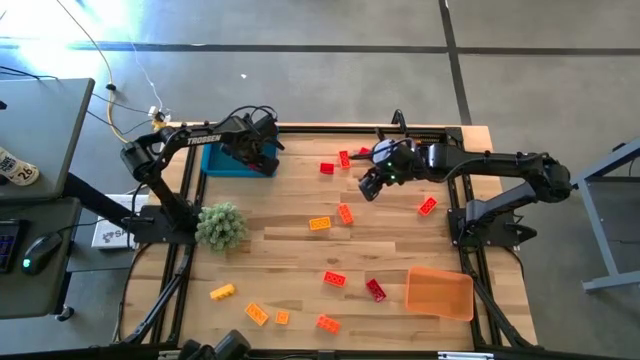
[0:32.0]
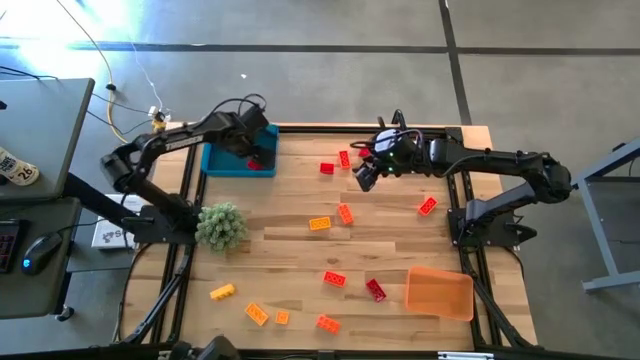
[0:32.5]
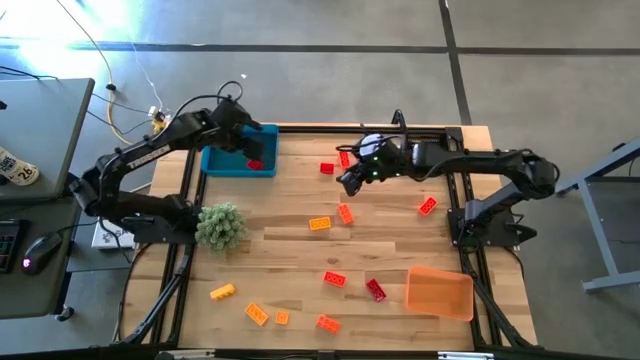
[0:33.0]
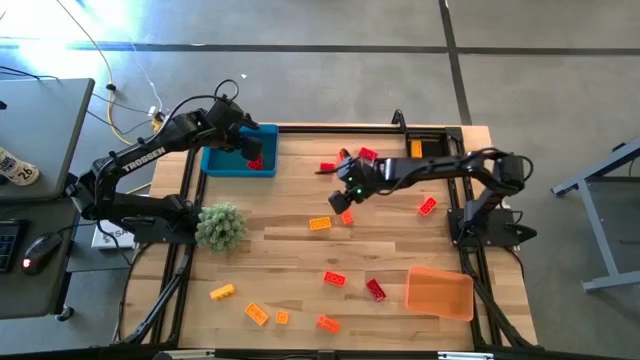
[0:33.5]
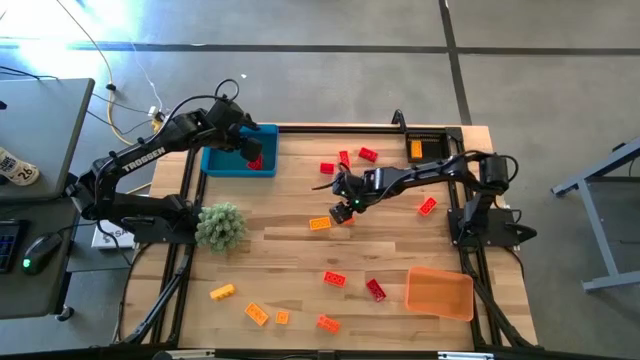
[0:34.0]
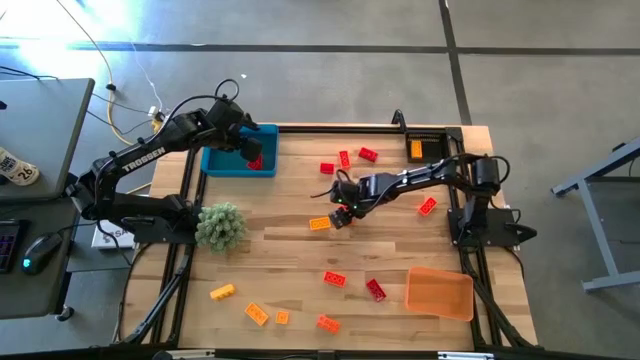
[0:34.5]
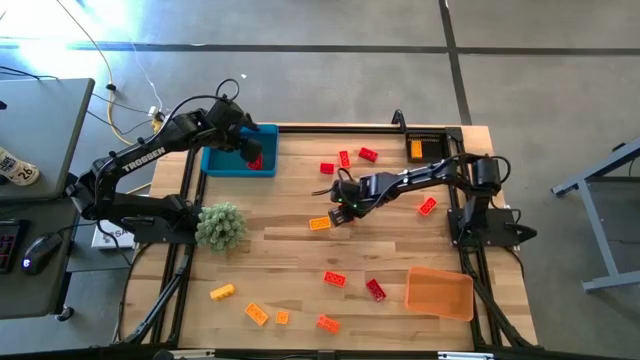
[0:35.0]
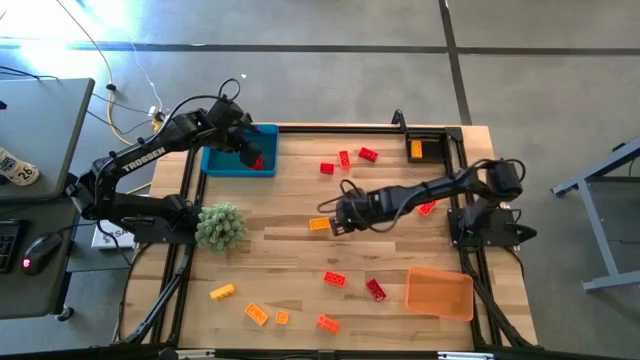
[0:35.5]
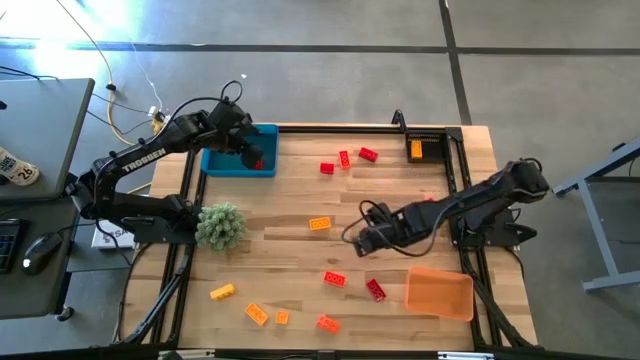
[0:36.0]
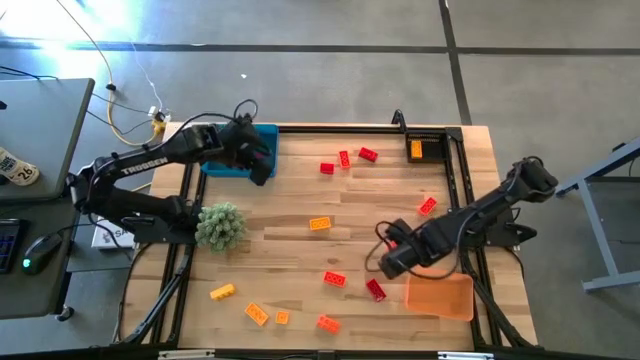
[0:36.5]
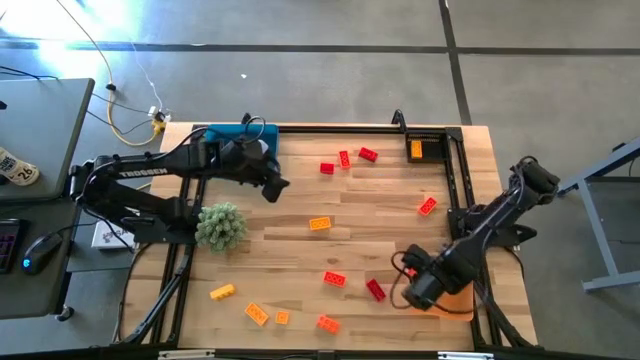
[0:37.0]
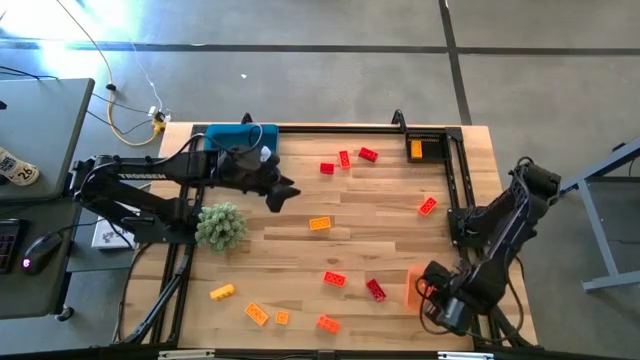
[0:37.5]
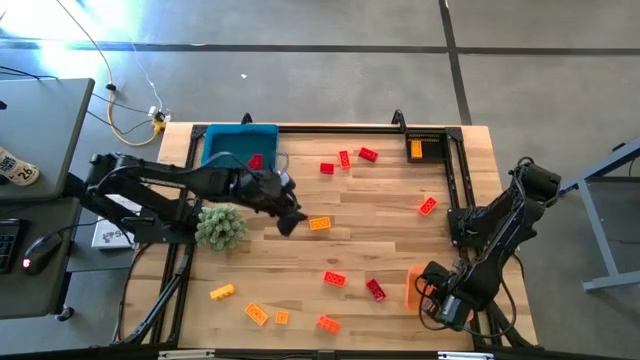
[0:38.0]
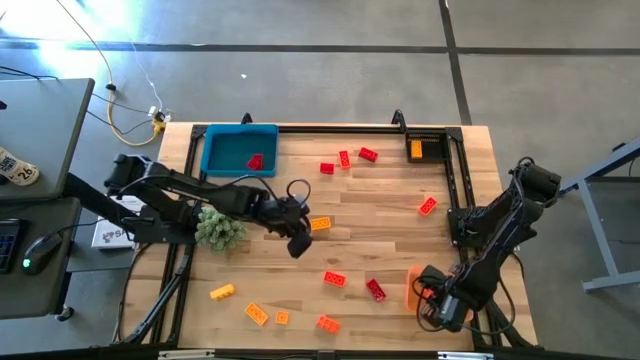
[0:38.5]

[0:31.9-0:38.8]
Task: Sort & place blocks by color
Put the orange game piece into the orange bin

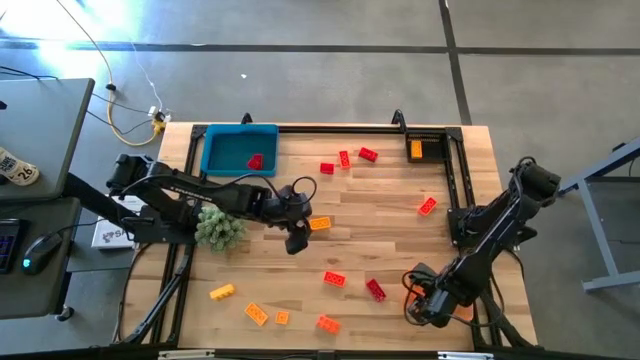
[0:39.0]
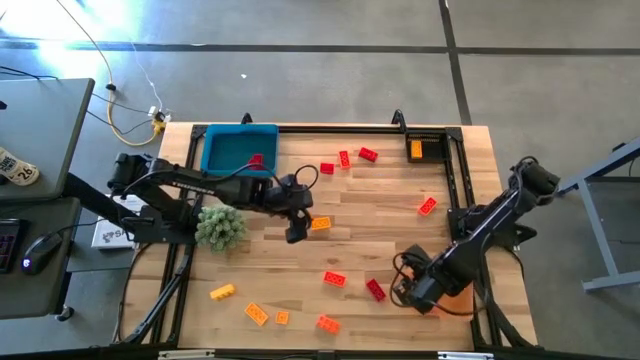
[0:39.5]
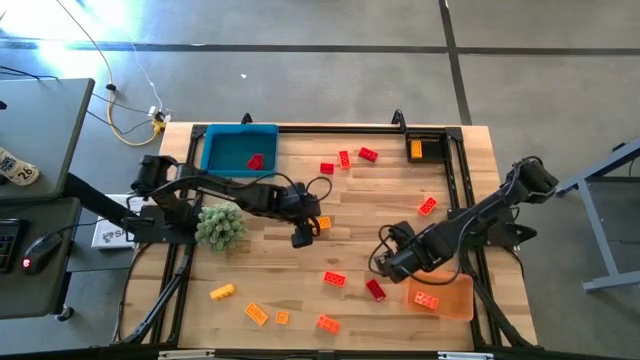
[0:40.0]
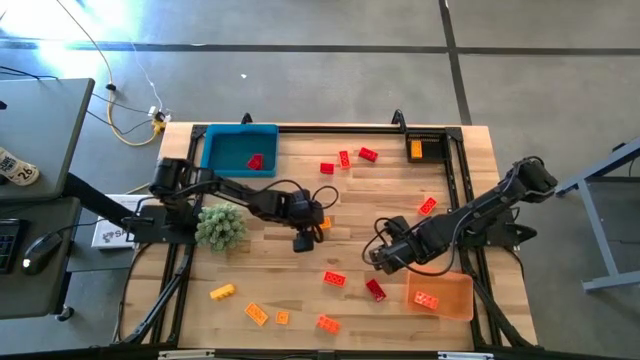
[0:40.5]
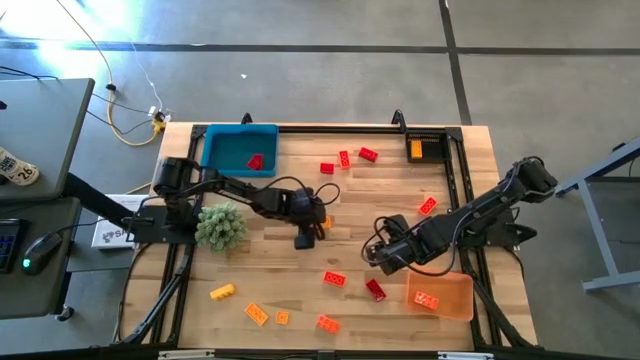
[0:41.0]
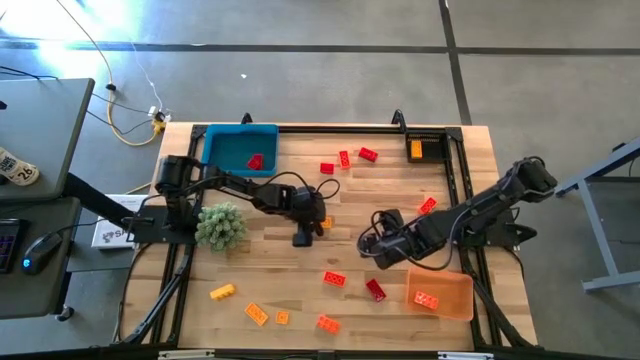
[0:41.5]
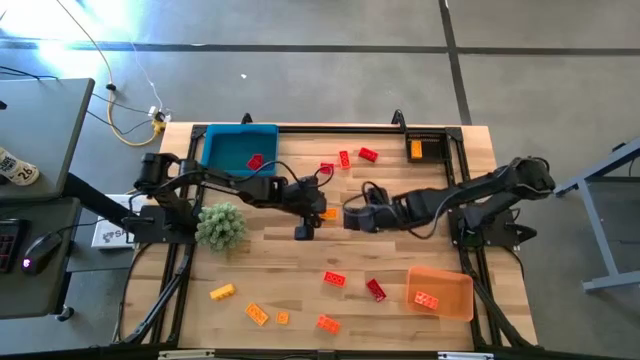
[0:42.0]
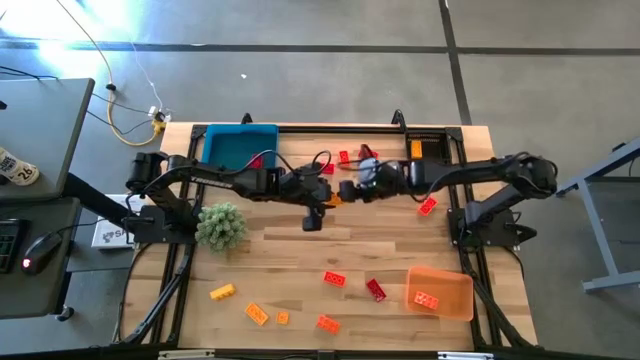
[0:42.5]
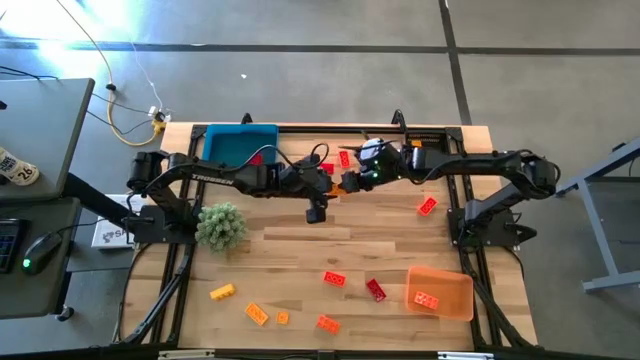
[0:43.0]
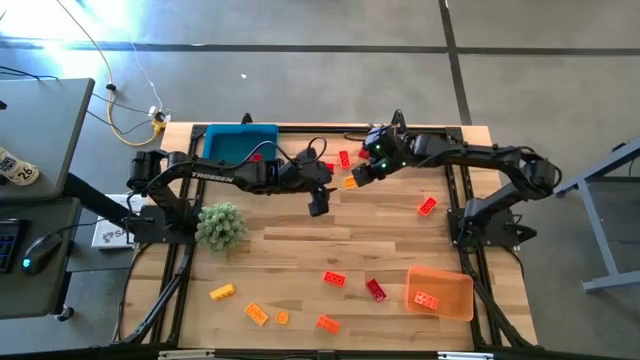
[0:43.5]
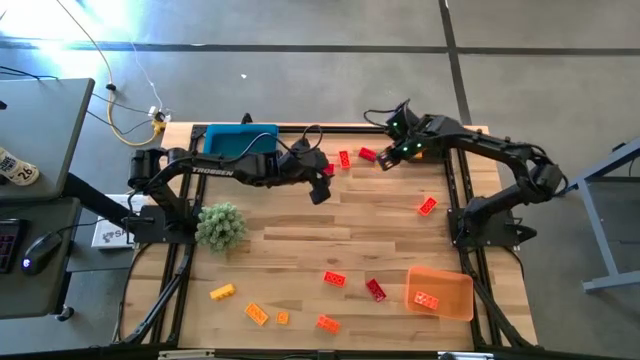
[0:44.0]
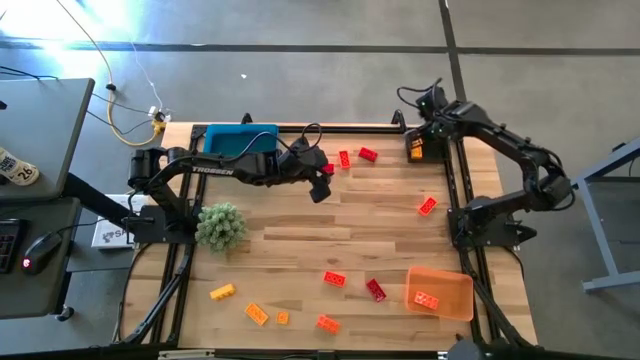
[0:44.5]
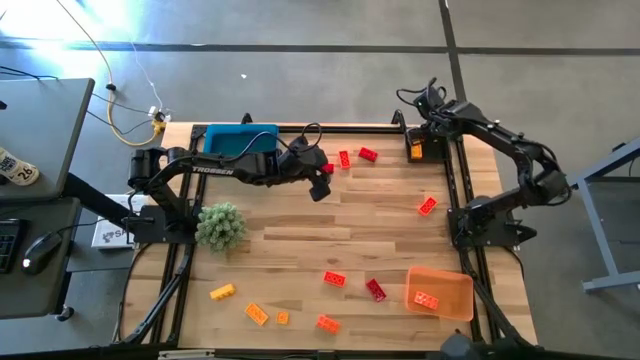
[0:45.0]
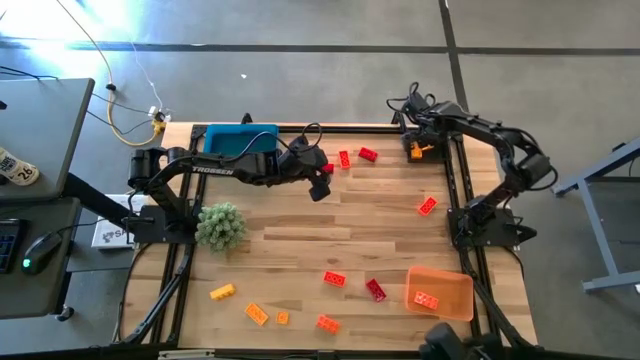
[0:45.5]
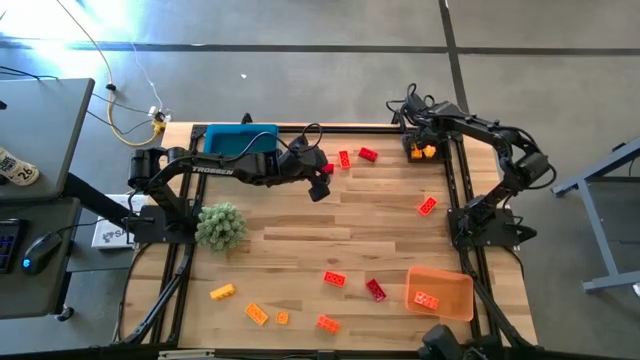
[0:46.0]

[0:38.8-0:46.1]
Put the yellow game piece into the black bin

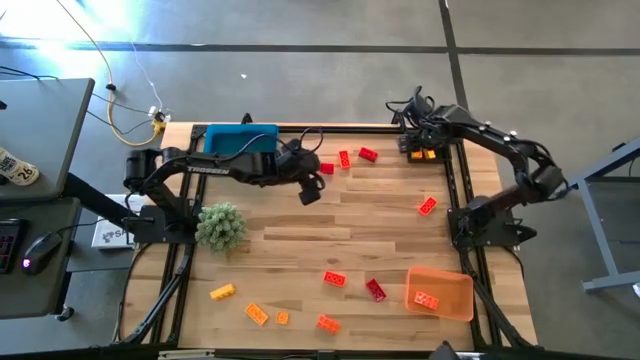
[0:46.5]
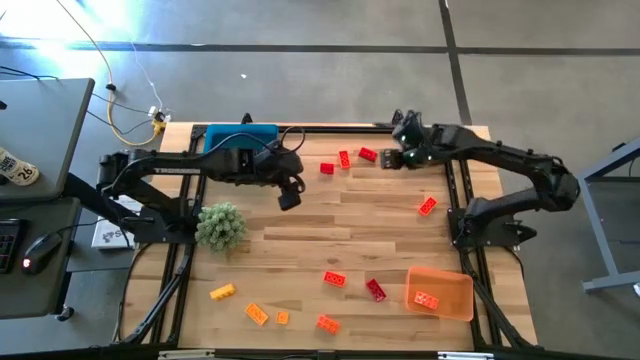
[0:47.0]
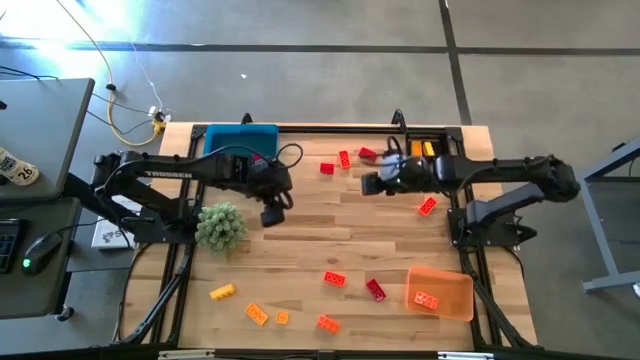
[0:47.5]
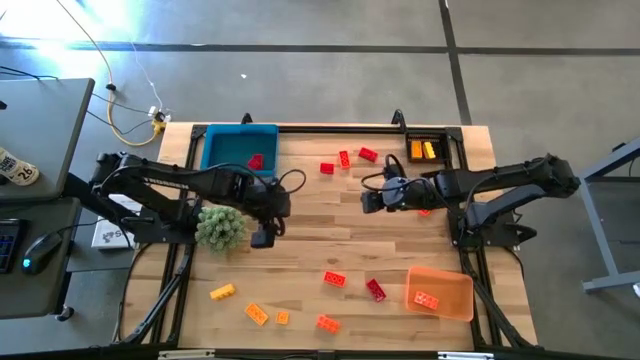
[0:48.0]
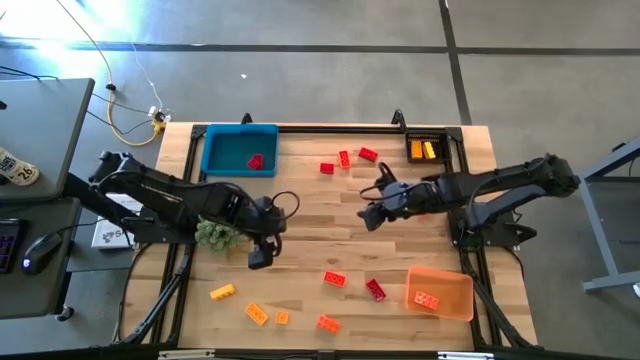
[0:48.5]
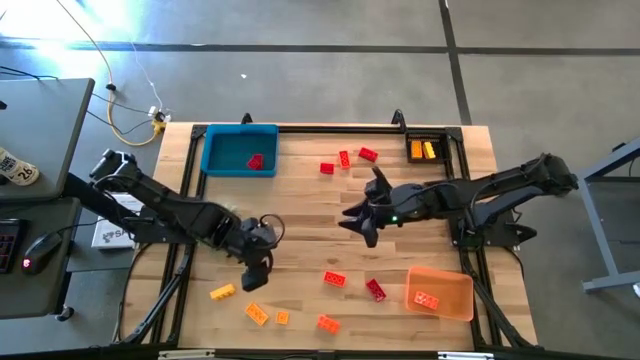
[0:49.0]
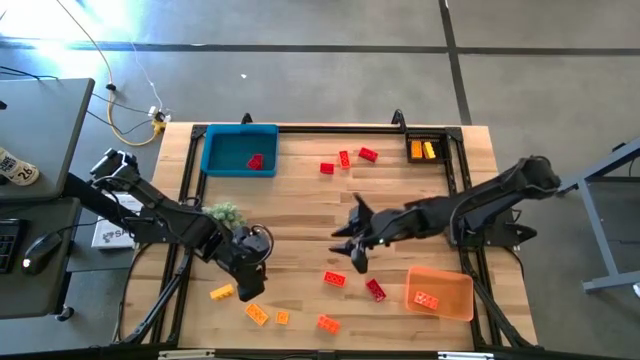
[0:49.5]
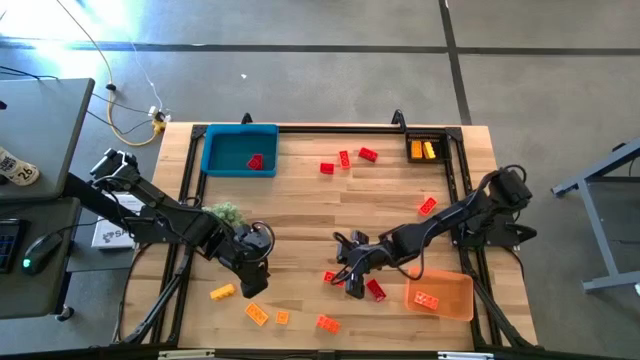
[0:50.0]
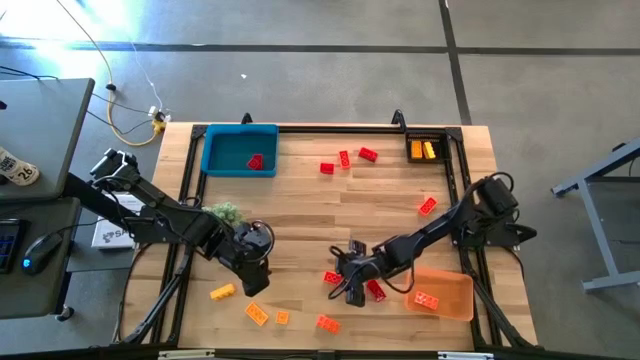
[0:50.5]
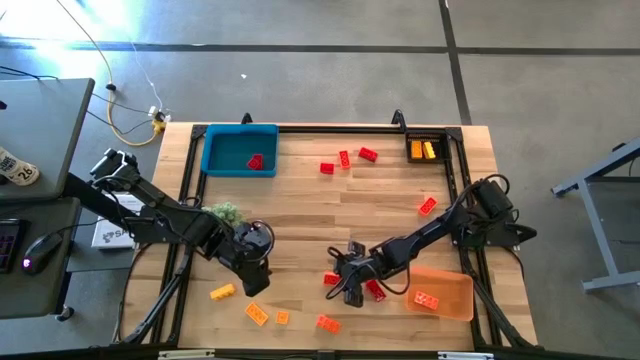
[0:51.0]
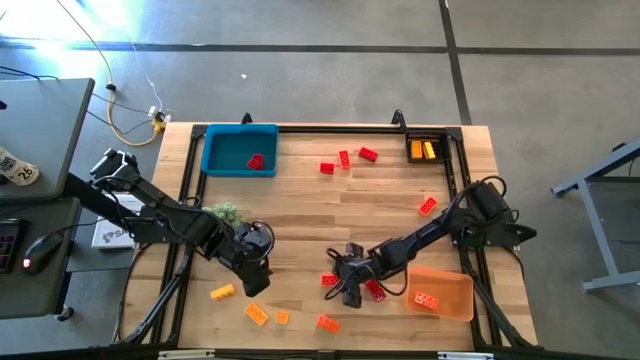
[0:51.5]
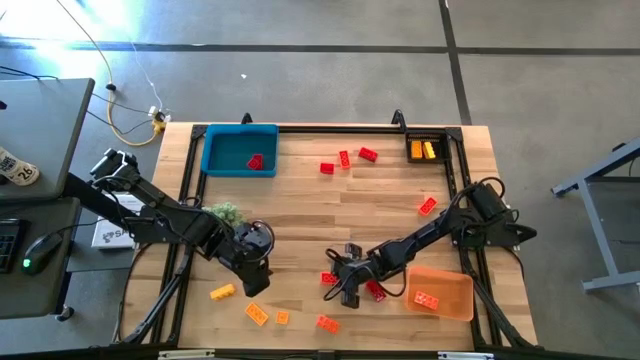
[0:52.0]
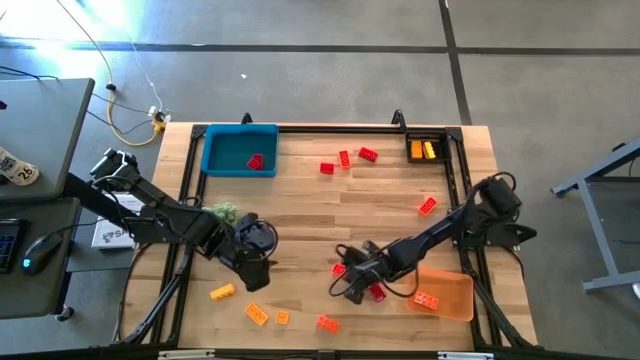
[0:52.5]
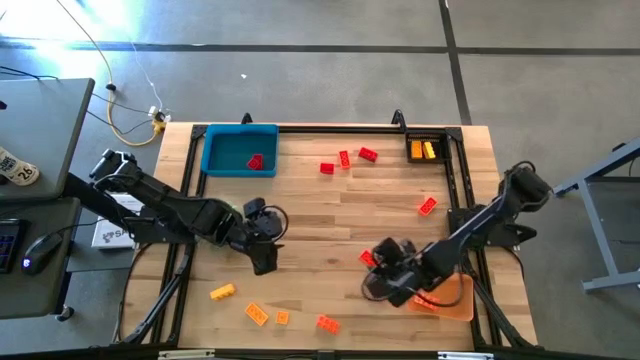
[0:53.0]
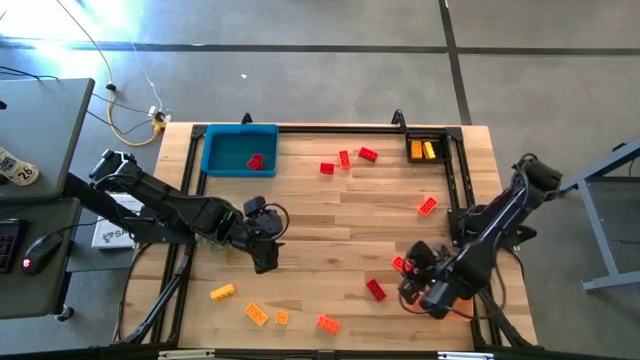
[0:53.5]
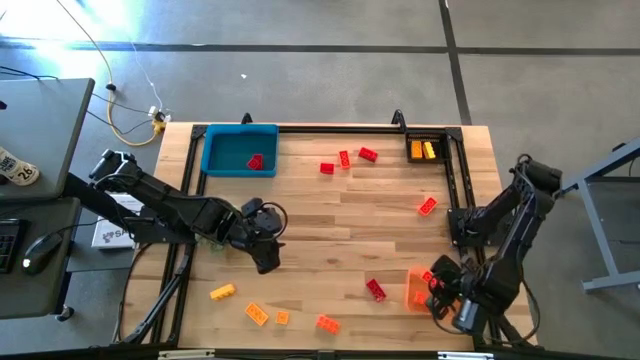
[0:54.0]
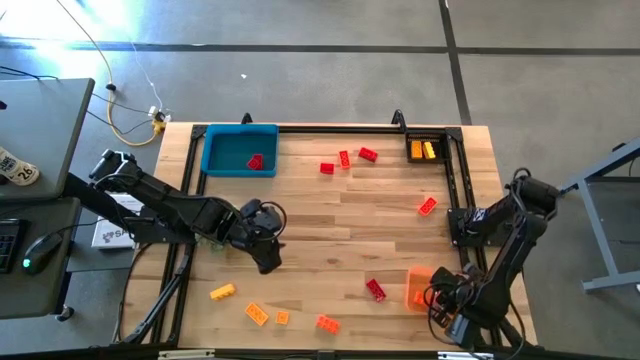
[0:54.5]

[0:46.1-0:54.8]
Put the orange game piece into the orange bin

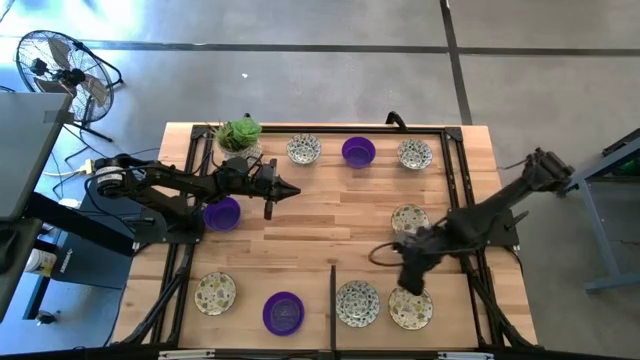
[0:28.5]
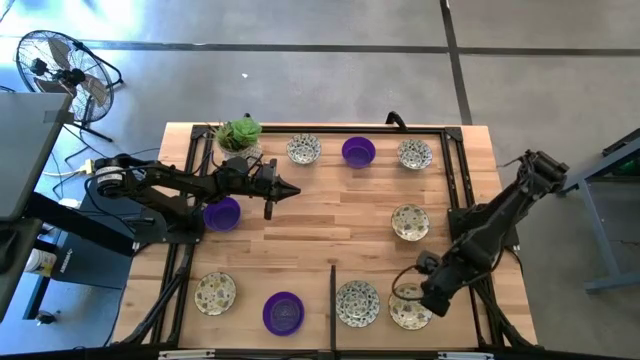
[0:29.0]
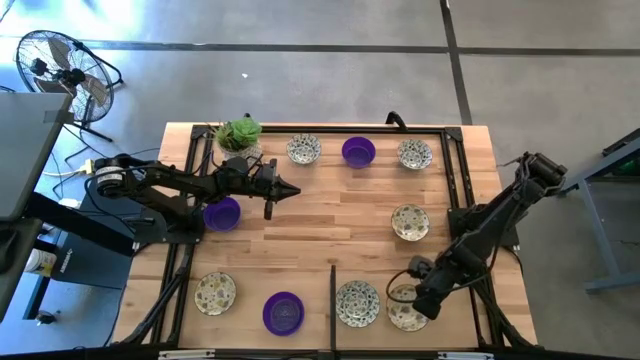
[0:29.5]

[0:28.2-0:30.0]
Task: Pick & Place Mini bowls
Adjust the yellow patterned bowl on the shelf
